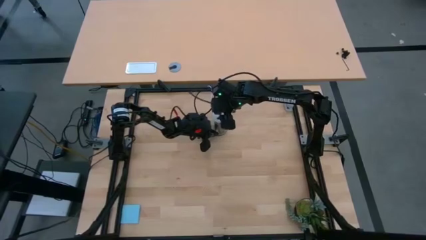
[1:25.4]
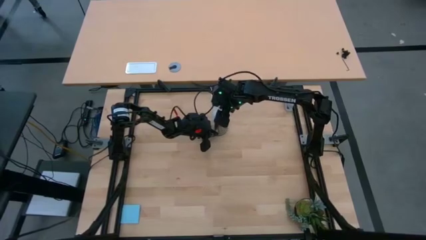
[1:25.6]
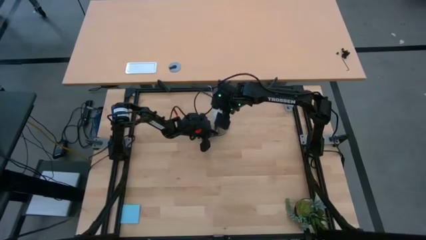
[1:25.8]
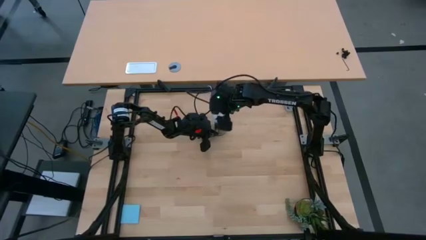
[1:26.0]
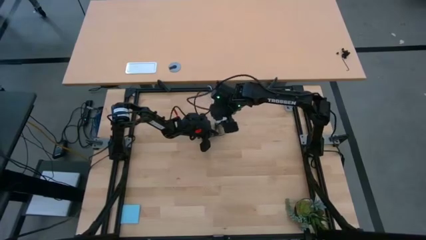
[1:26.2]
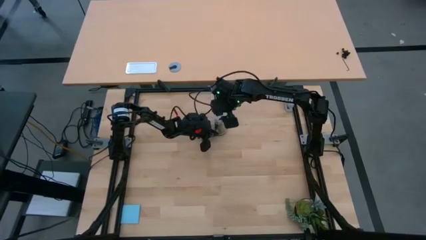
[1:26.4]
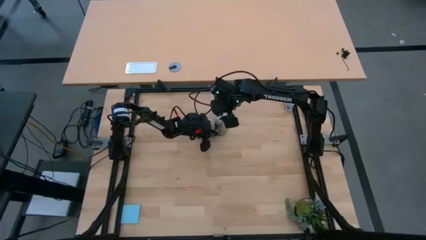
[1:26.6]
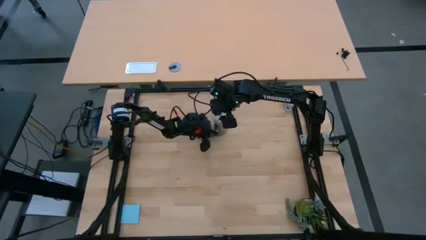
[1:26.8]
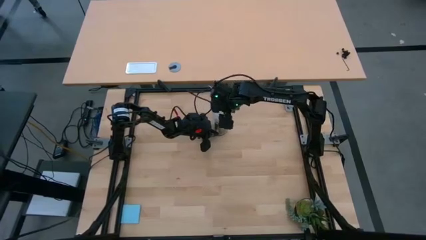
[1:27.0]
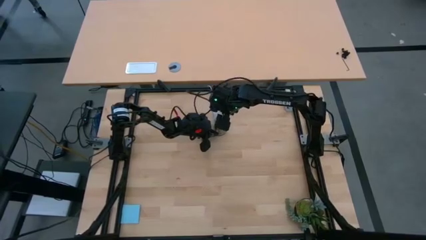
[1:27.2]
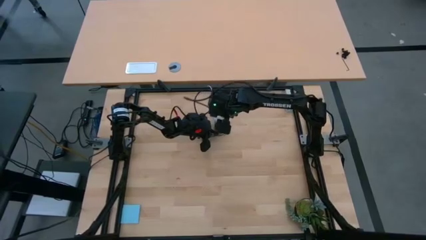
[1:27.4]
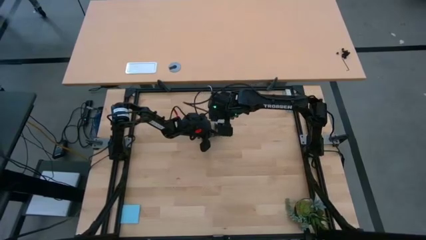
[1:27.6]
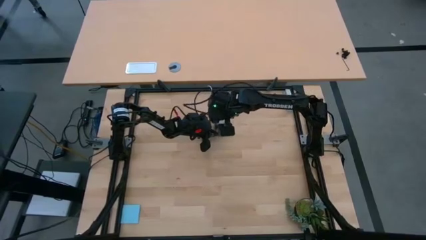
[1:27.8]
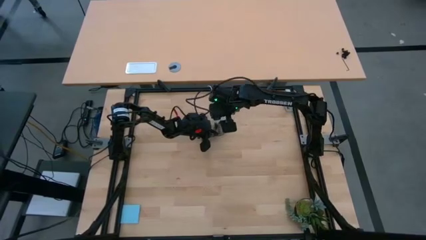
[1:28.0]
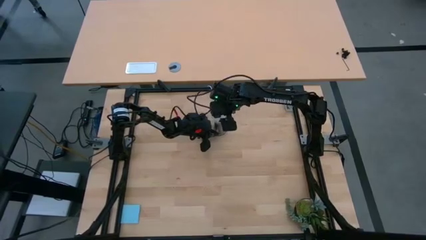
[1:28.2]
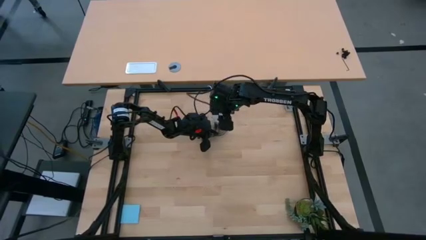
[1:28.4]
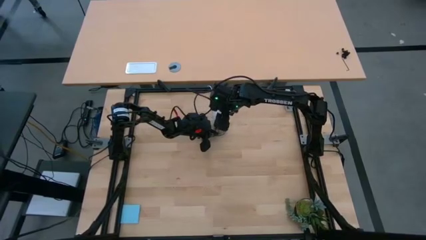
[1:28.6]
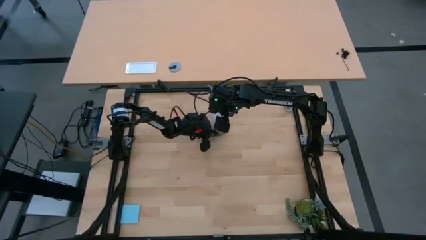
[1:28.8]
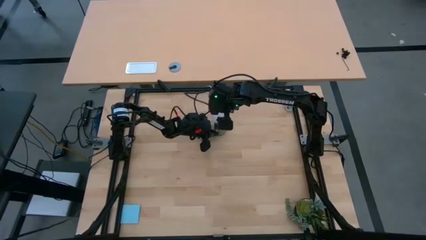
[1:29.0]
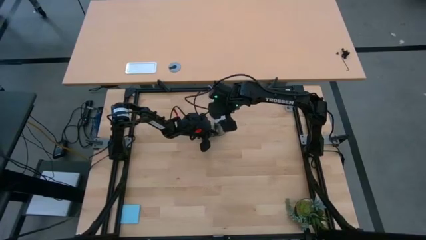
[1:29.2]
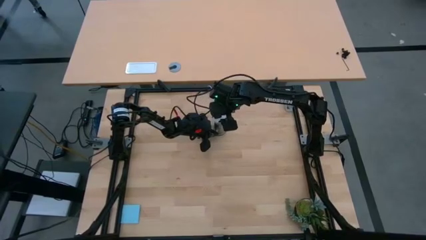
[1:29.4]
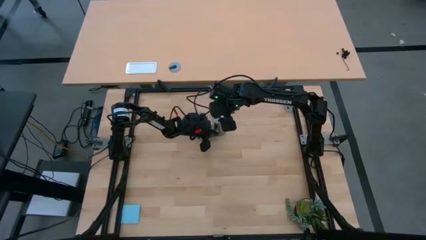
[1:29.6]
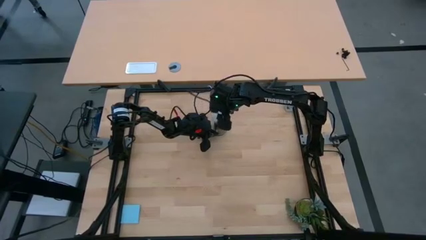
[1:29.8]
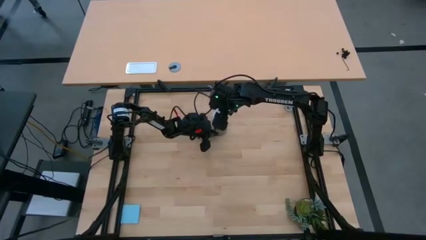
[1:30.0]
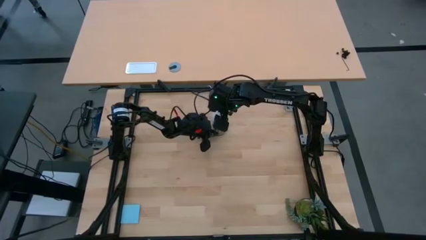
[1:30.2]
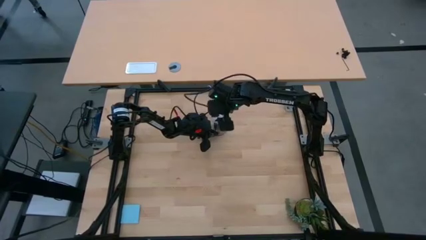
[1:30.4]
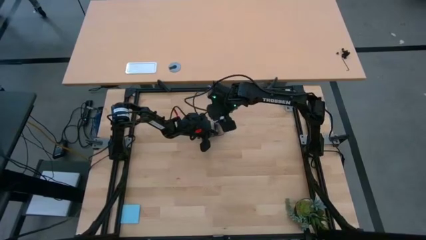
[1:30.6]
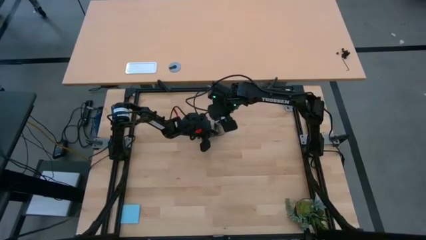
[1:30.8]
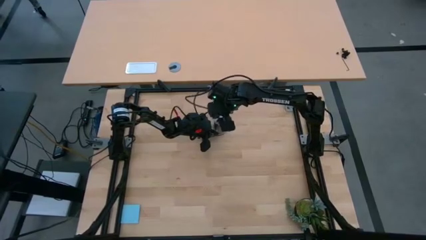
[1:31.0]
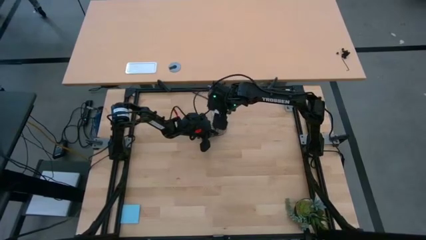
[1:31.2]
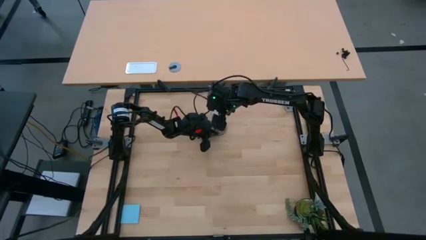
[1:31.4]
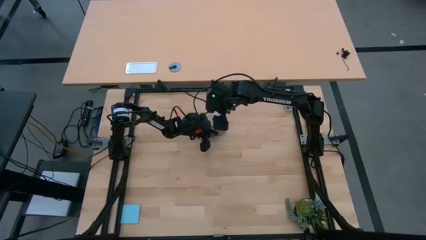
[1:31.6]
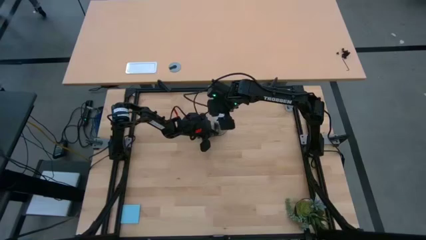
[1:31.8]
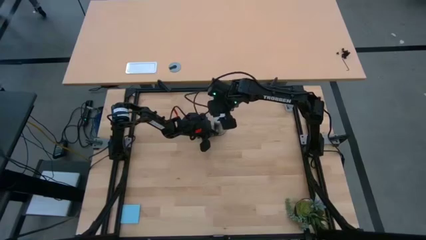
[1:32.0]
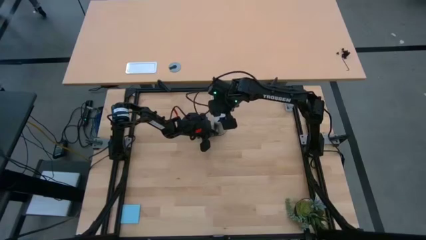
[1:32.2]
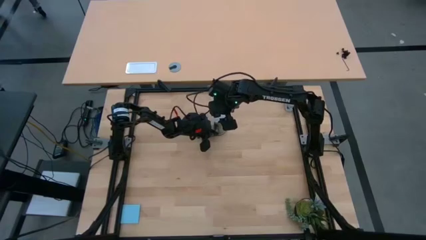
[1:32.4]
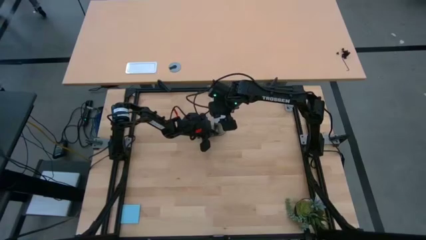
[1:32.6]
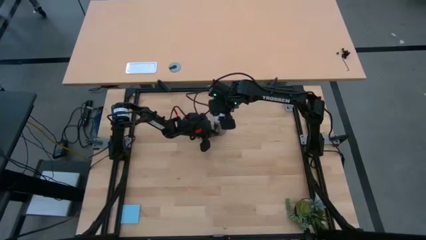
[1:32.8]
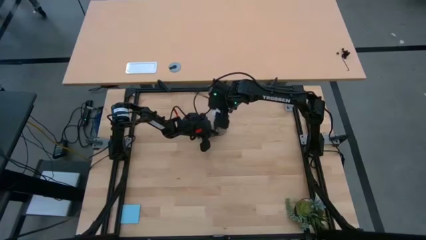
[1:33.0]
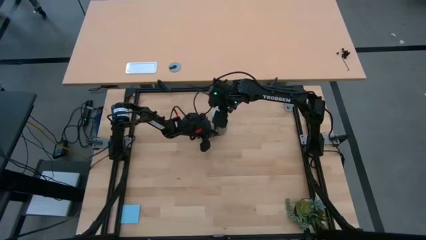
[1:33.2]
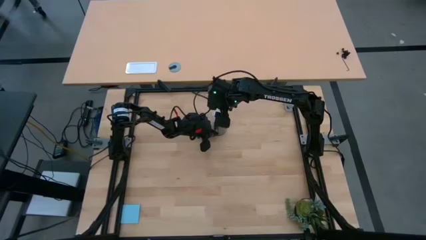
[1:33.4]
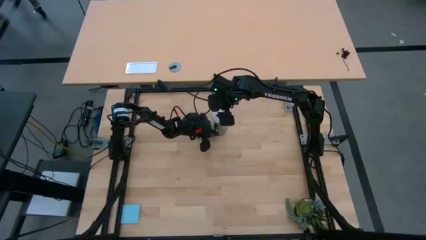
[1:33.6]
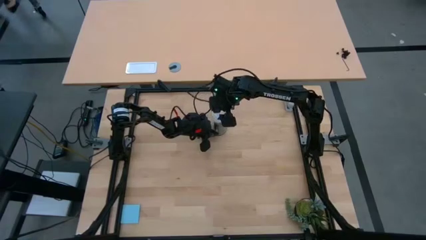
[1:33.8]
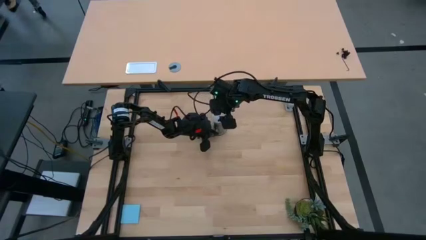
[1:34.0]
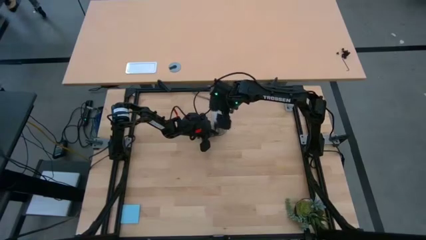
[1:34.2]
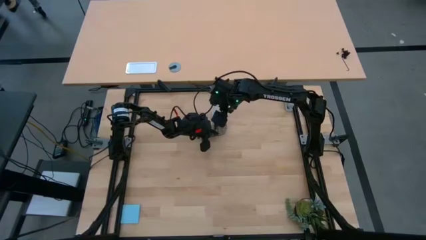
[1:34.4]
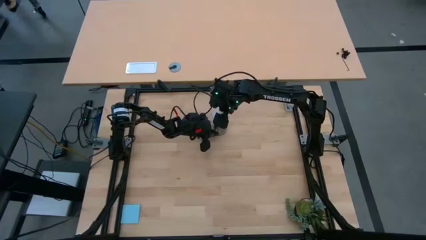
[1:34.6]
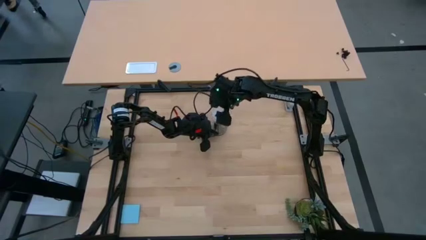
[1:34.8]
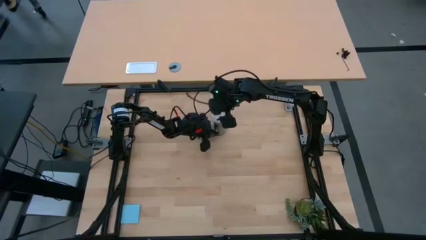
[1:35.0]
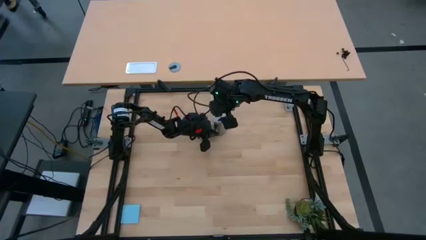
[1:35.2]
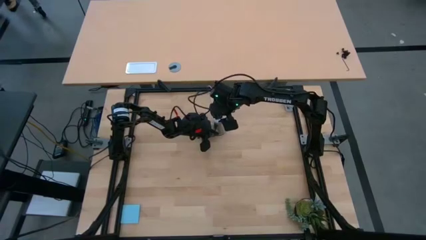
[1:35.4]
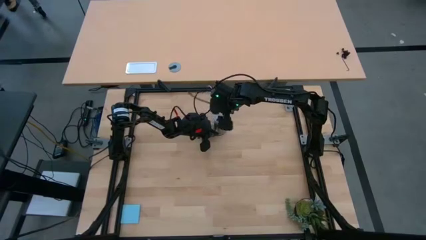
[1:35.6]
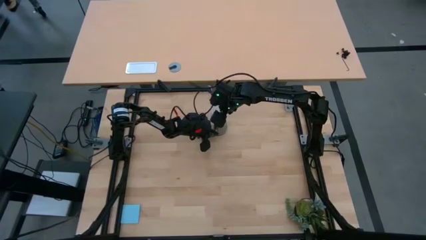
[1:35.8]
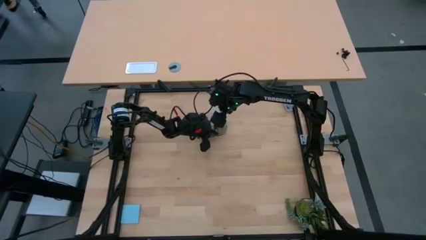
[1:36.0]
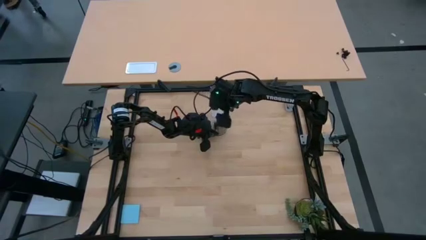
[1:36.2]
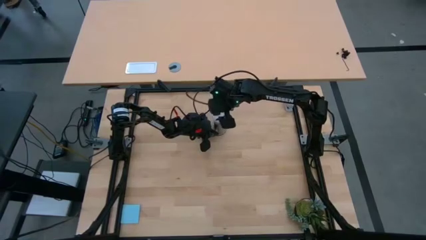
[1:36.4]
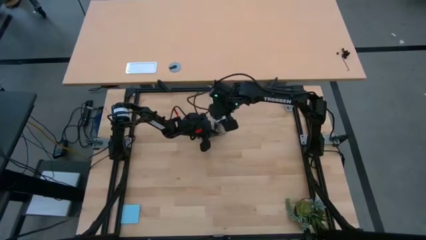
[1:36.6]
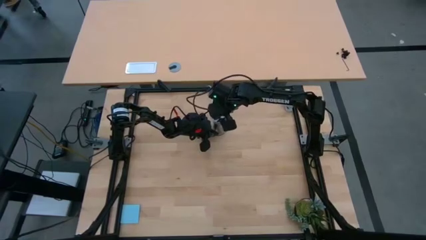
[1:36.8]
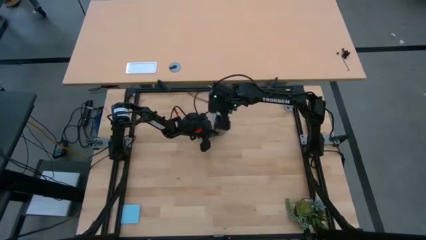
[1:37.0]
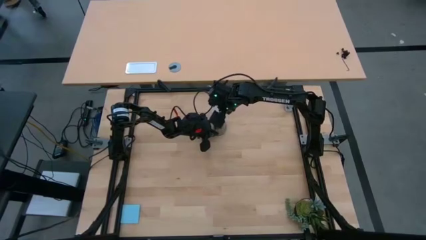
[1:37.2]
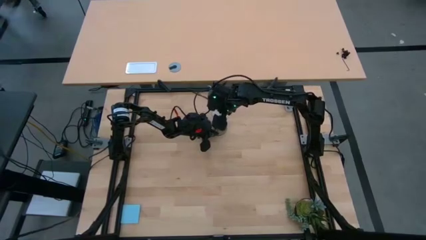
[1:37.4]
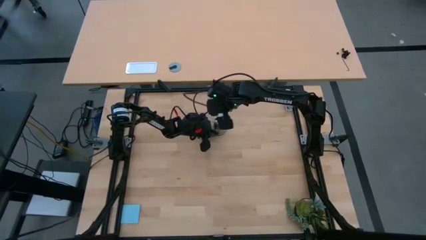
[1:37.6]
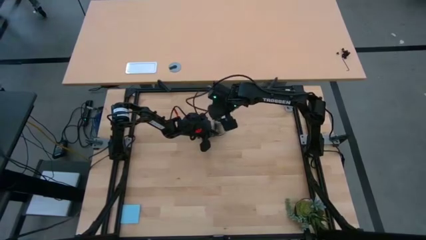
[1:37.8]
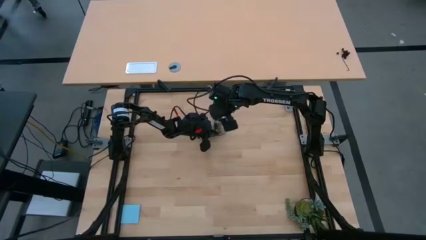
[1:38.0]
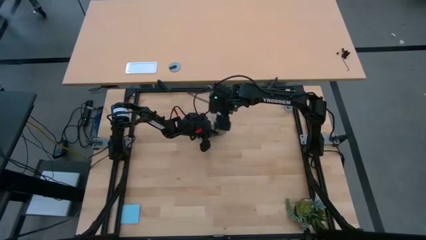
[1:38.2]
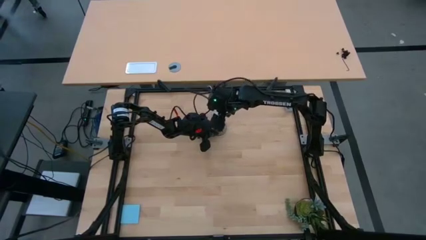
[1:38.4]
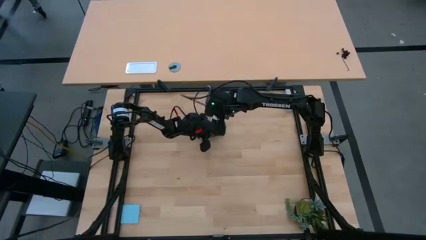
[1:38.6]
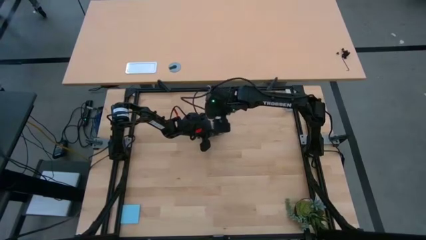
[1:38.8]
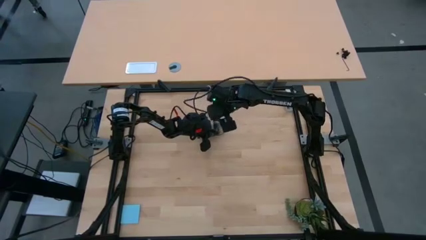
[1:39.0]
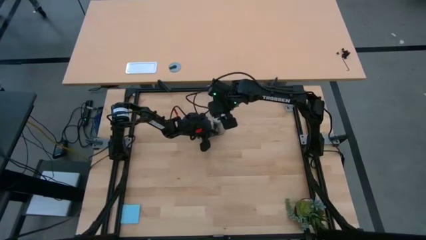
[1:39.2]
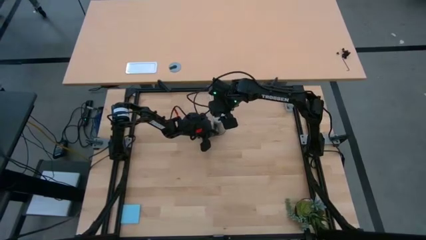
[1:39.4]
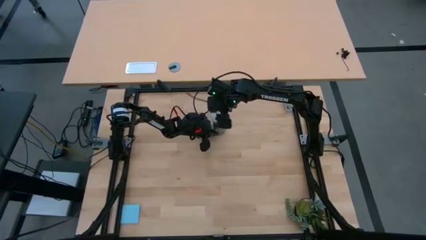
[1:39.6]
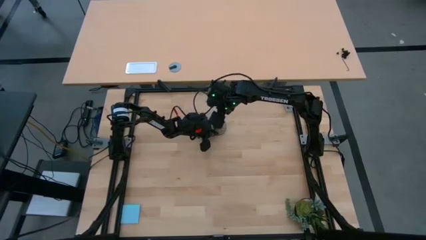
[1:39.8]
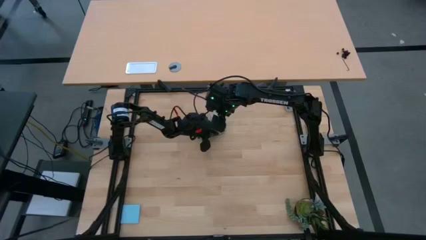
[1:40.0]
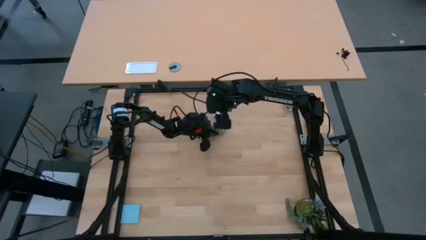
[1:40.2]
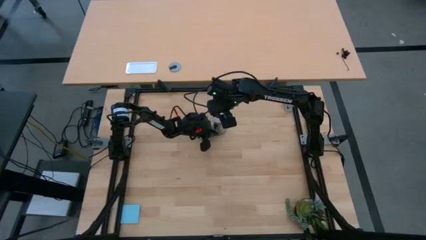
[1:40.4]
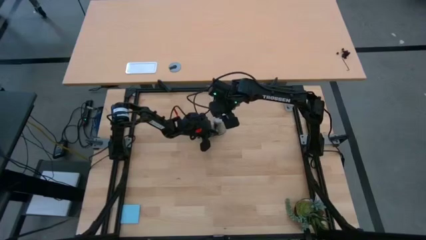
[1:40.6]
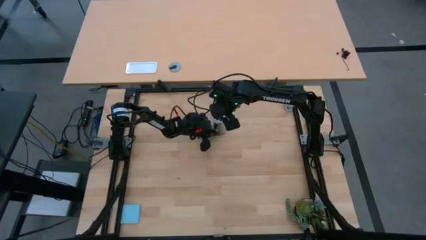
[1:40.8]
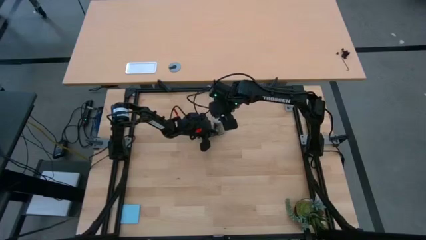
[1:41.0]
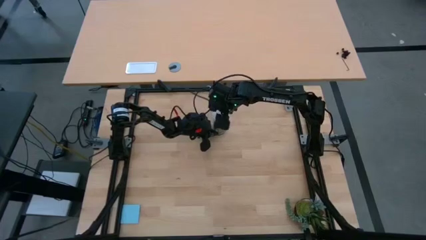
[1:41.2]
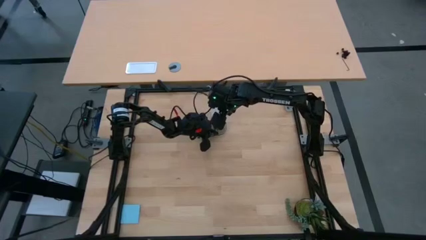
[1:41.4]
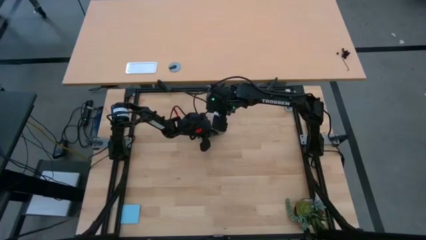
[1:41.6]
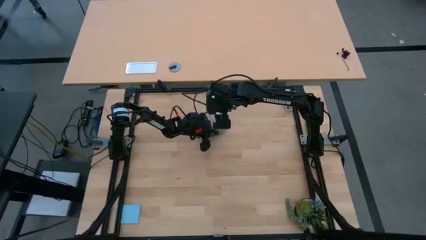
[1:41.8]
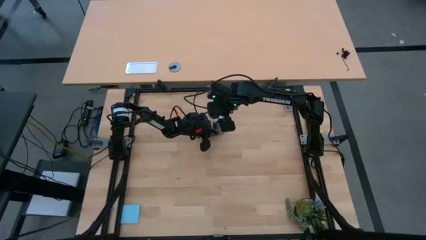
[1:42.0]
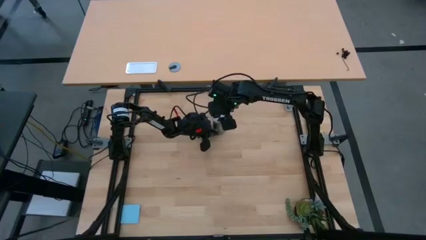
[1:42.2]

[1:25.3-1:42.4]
Task: Screw lightbulb
Insert the light bulb into the table lamp holder
